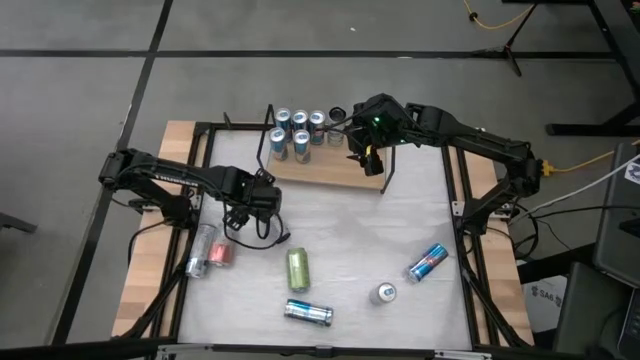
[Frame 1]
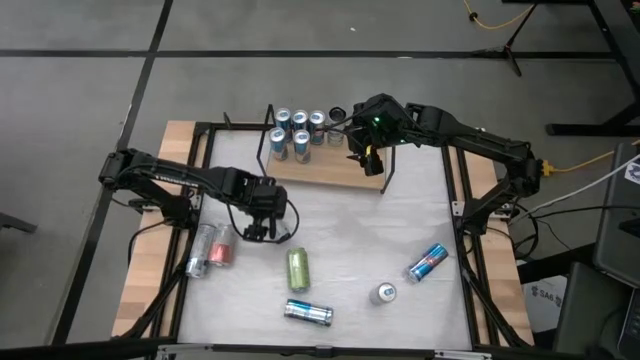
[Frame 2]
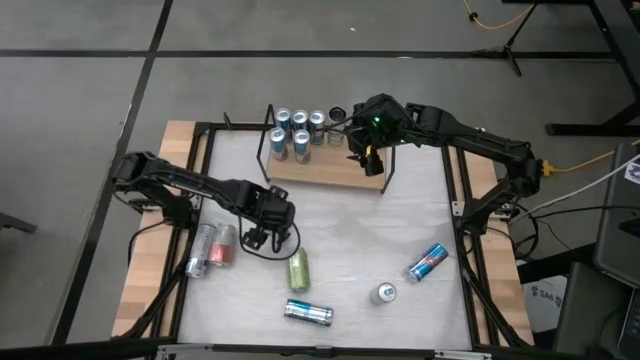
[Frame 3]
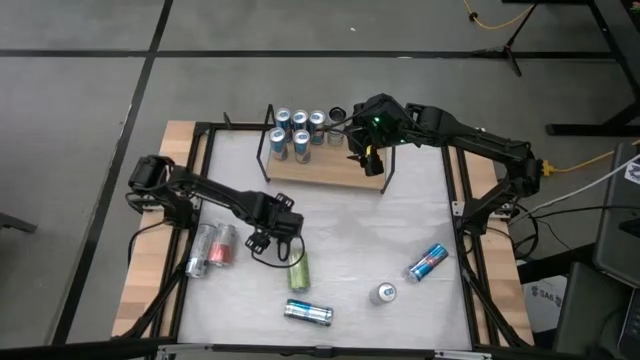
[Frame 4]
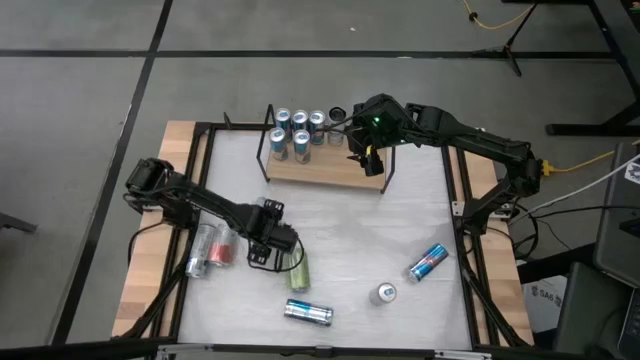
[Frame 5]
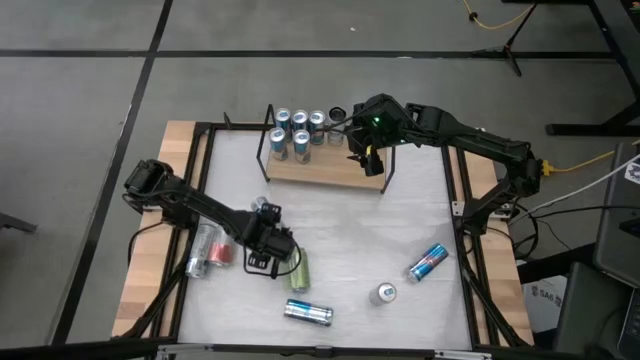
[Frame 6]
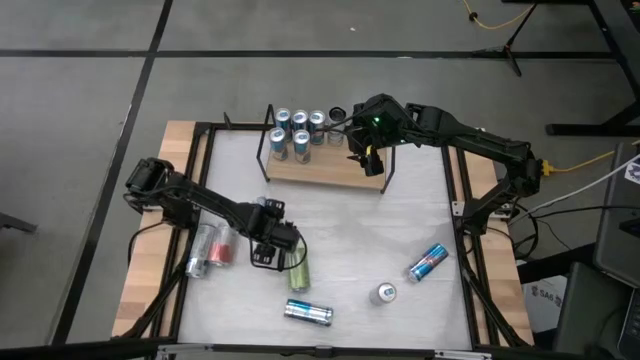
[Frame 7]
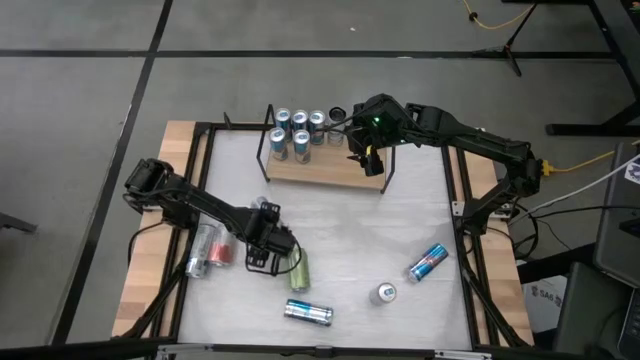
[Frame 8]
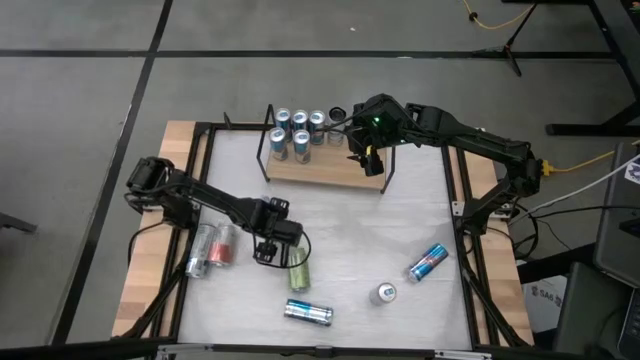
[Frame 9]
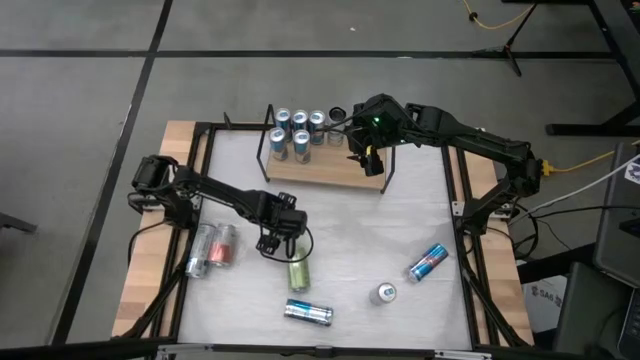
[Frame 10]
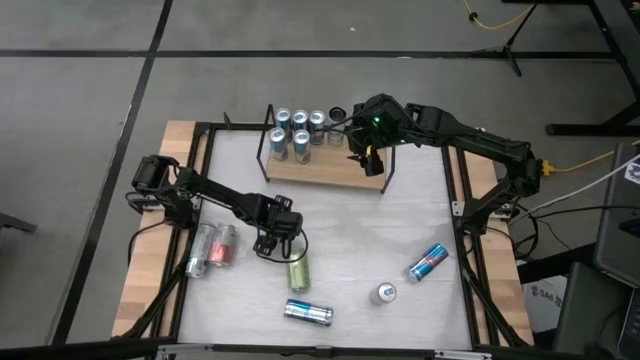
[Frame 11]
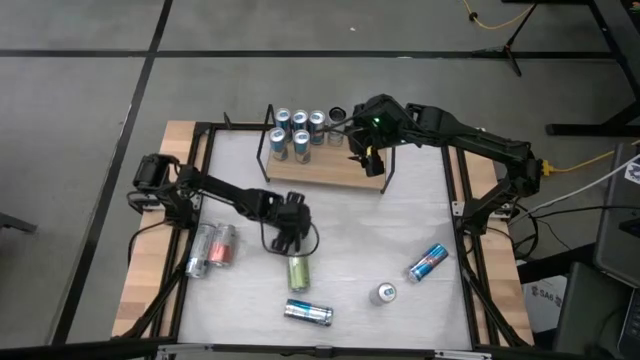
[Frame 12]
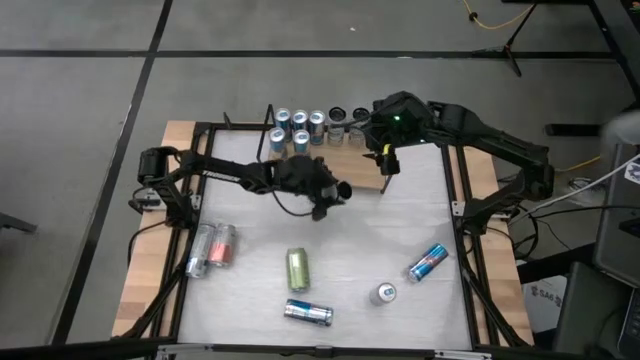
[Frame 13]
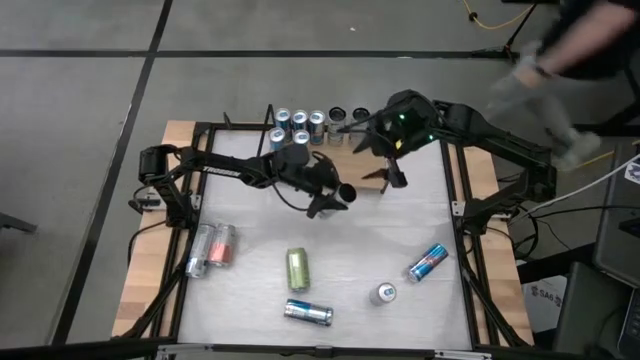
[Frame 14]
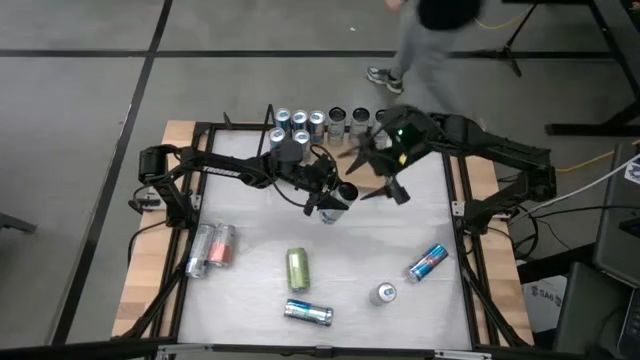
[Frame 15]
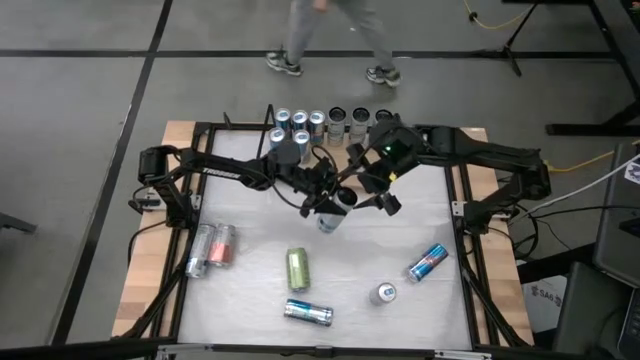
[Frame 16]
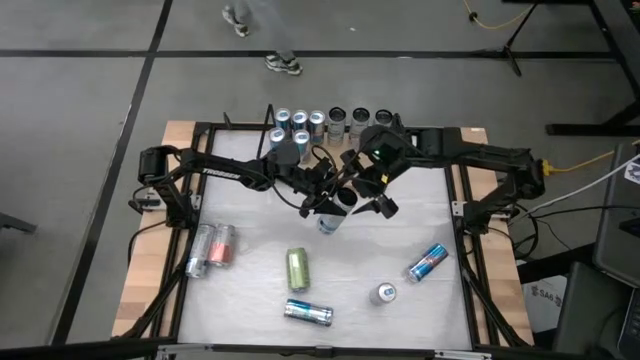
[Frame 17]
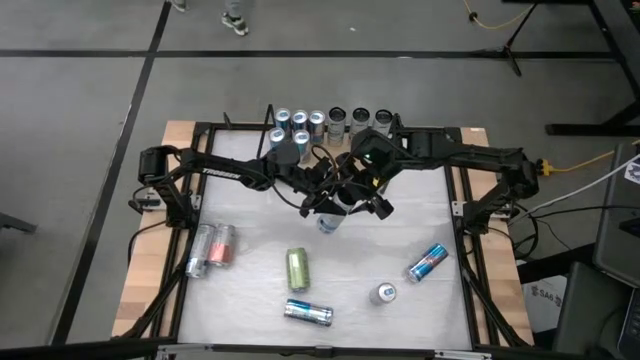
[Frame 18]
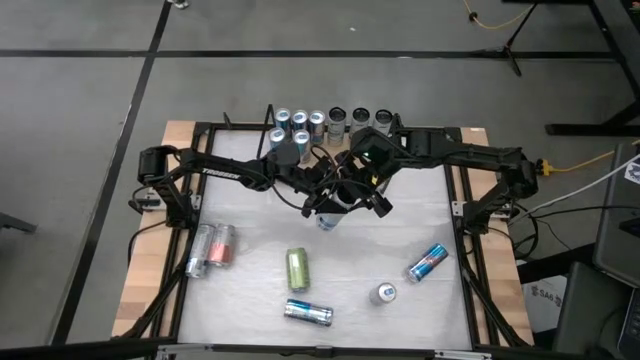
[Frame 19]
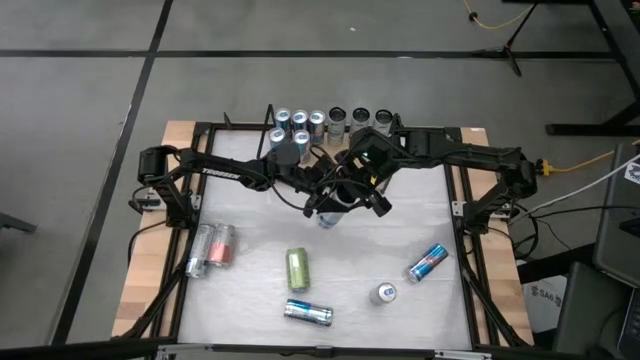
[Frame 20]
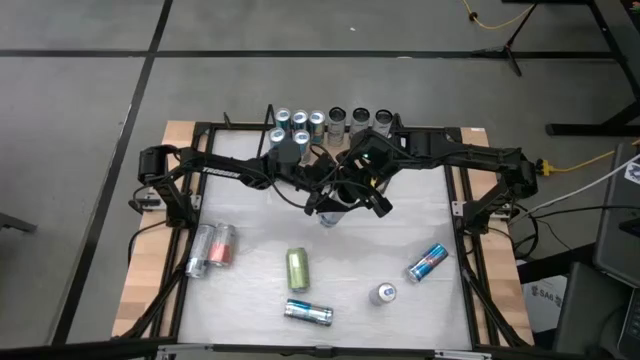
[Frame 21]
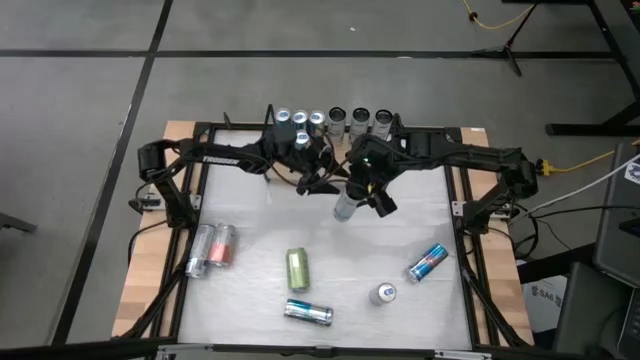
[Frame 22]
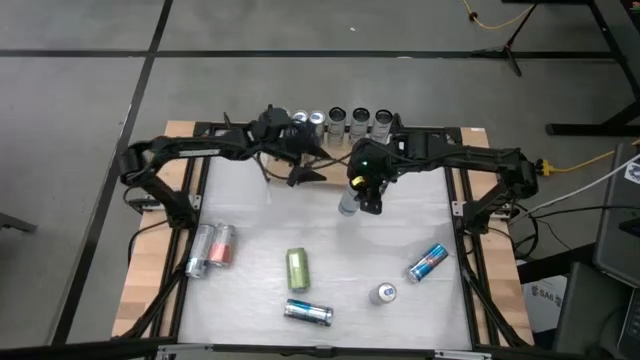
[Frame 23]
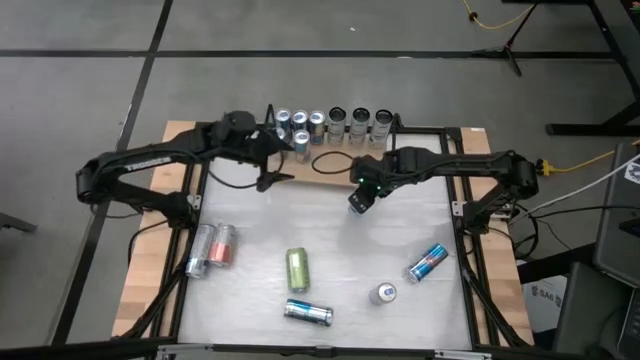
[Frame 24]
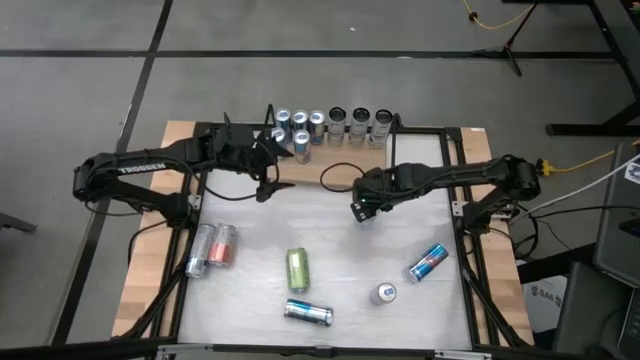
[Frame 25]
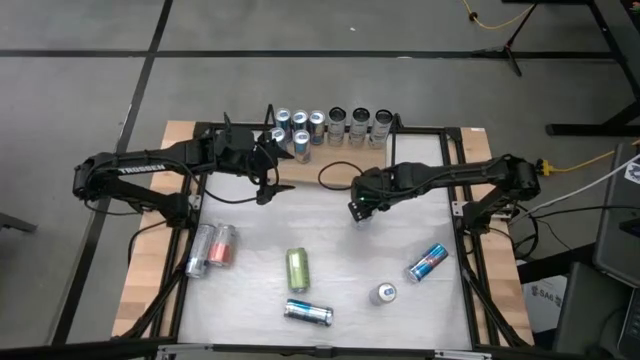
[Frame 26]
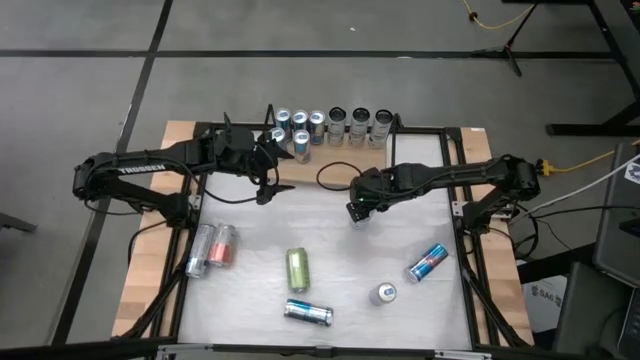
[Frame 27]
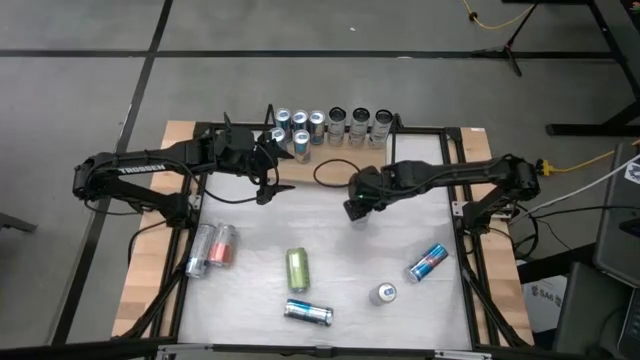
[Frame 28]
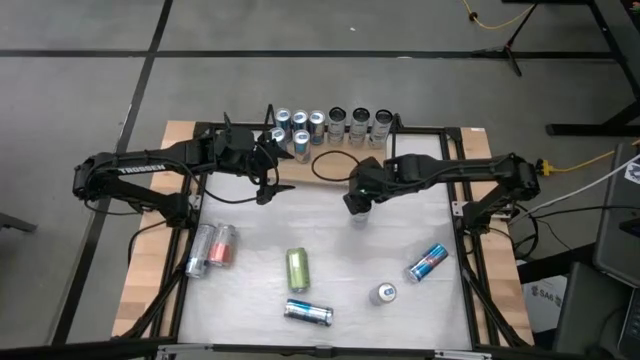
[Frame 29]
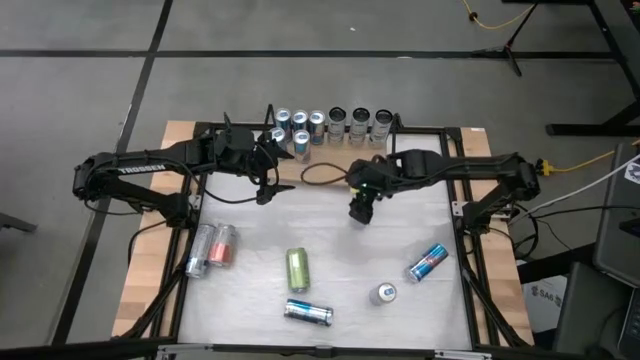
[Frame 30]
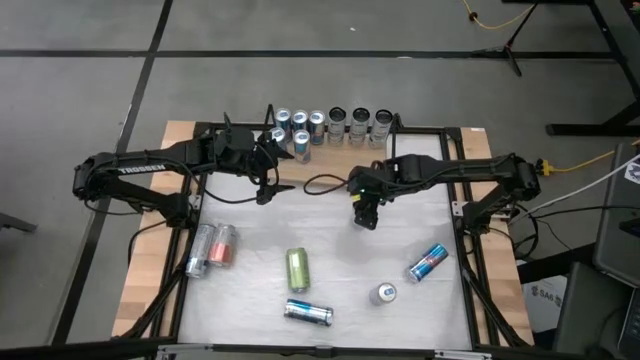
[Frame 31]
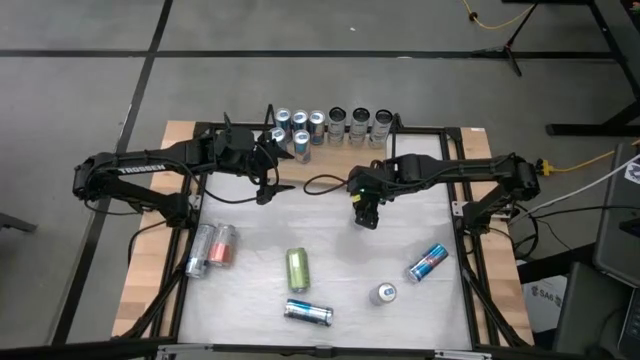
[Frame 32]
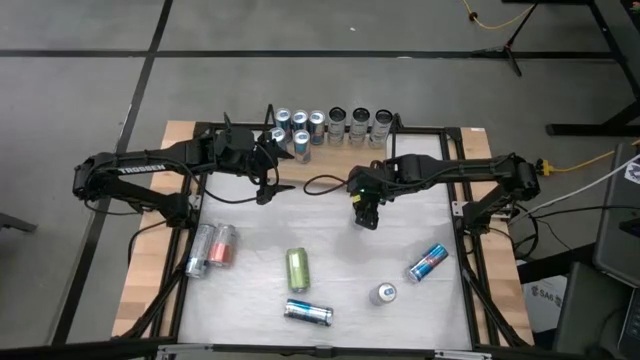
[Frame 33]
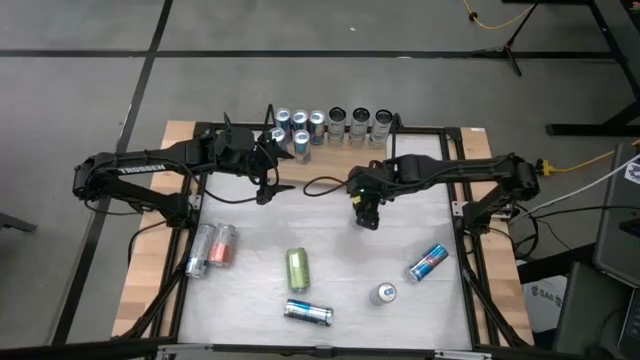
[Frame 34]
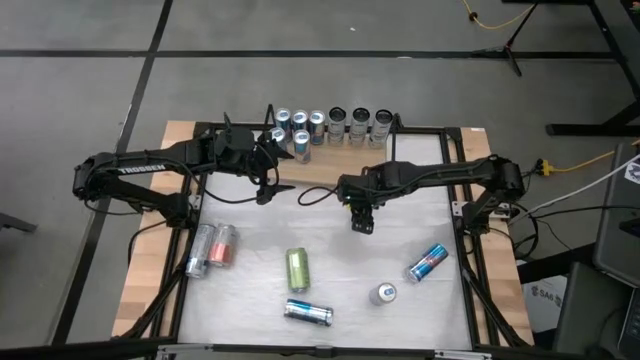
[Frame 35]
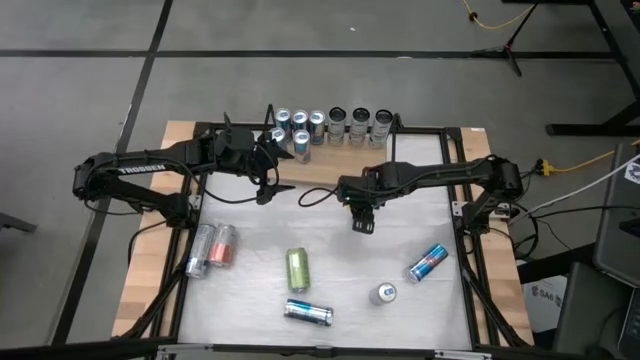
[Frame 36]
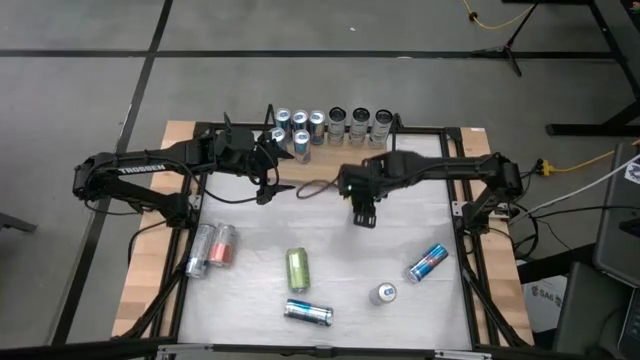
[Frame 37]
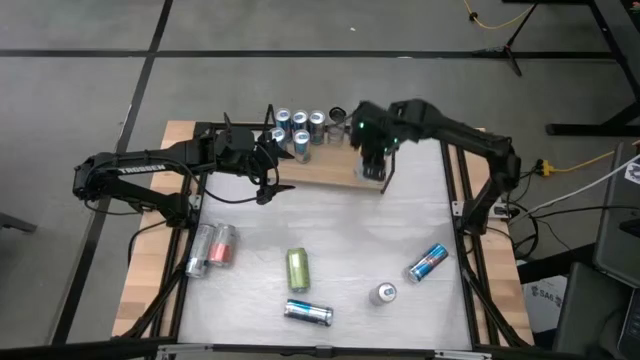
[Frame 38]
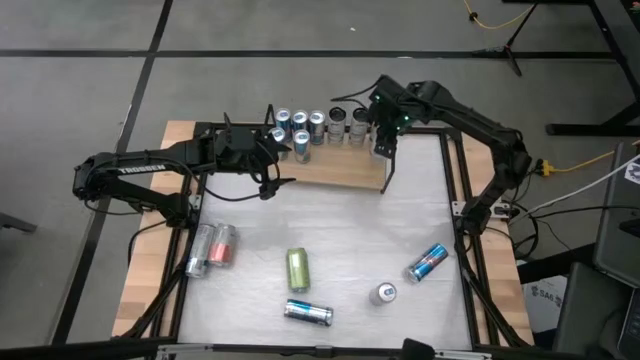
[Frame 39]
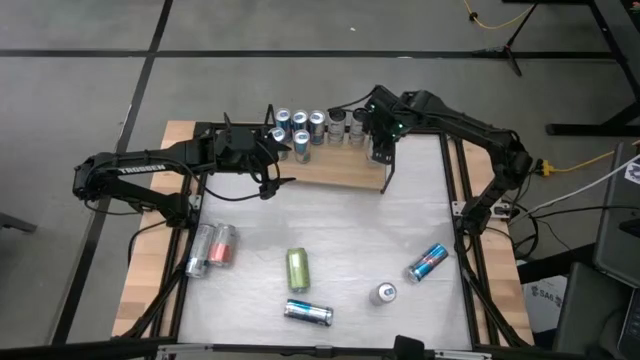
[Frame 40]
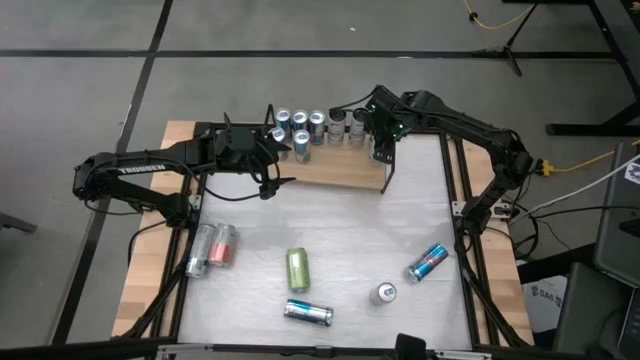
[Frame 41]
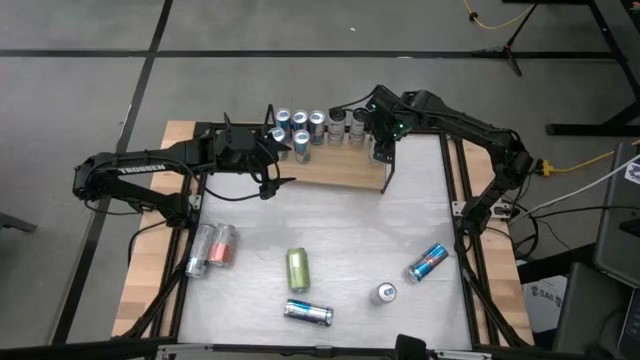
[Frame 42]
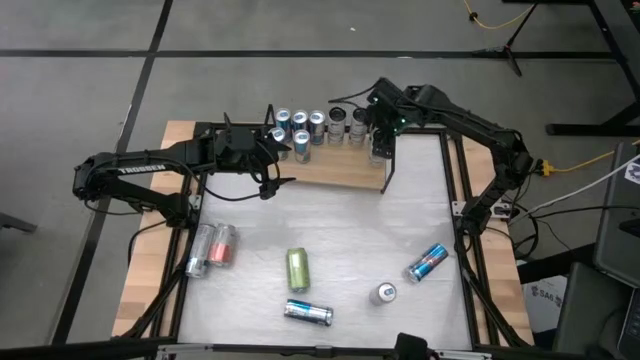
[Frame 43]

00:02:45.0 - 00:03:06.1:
Task: Place canned beverage on shelf
Put the white blue soda can on the shelf aligned with the other white blue soda can

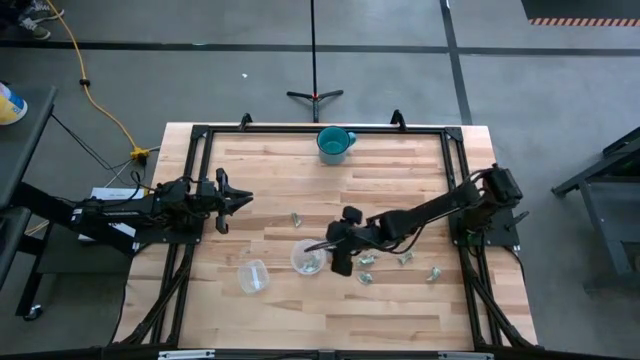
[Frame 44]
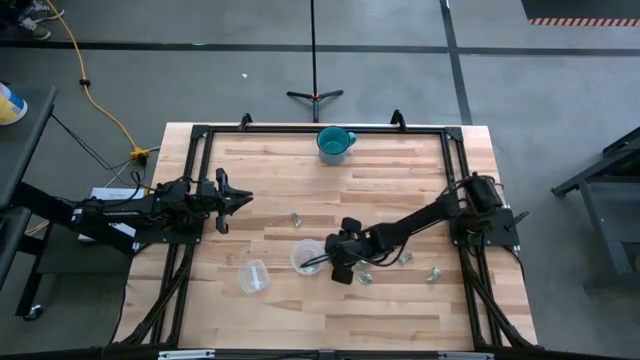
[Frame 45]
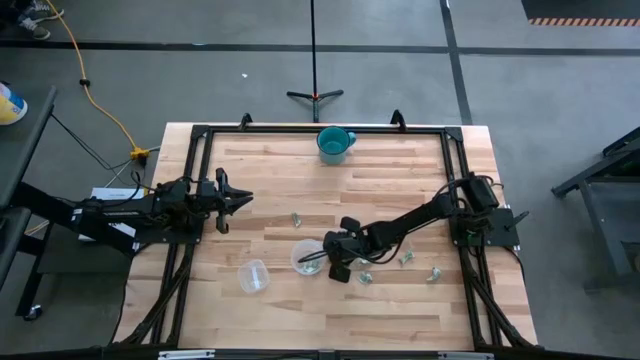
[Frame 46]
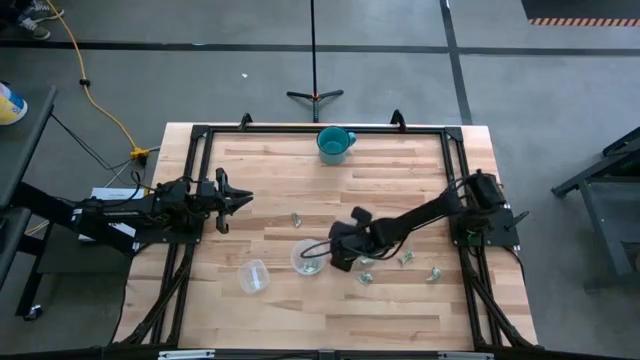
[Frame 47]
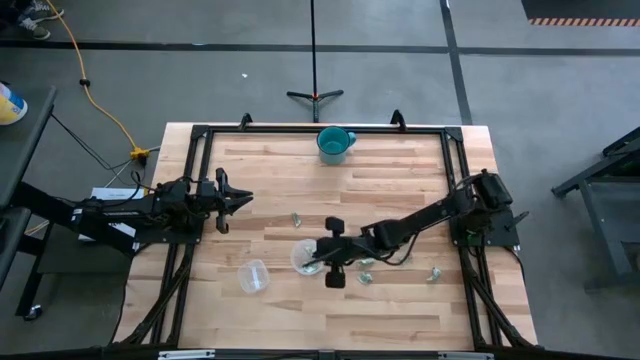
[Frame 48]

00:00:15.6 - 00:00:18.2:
Task: Pick and place items into bin
Put the stevia packet into the right transparent bin
